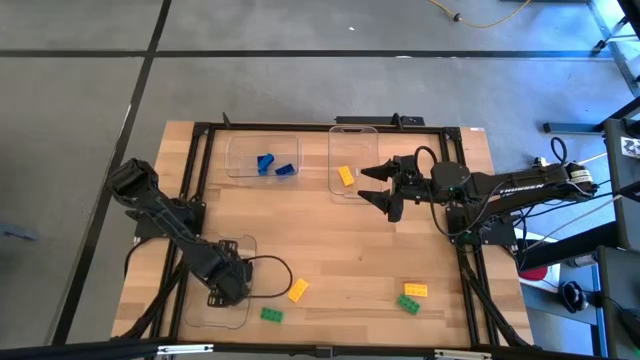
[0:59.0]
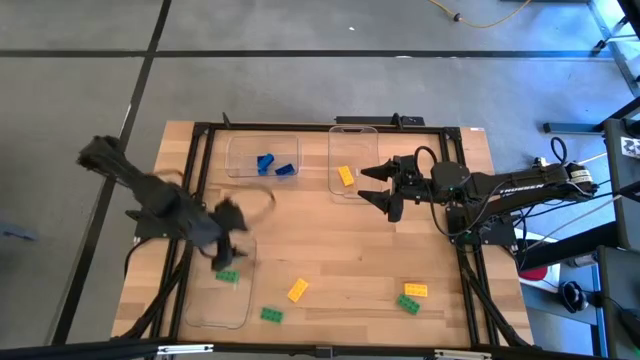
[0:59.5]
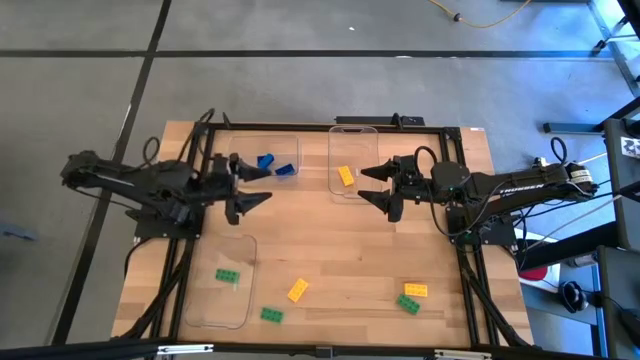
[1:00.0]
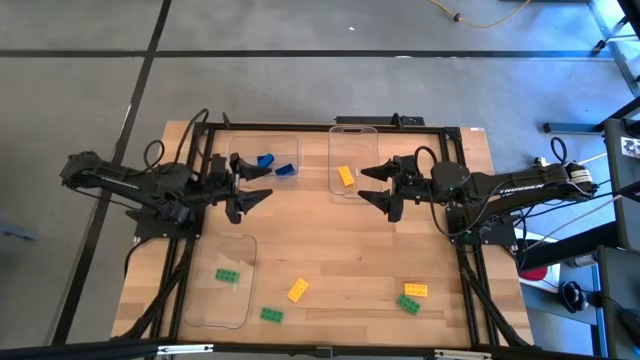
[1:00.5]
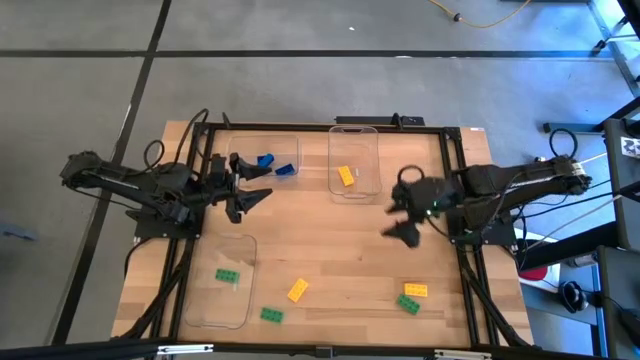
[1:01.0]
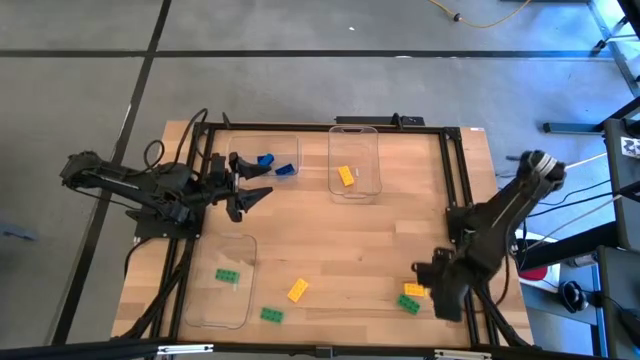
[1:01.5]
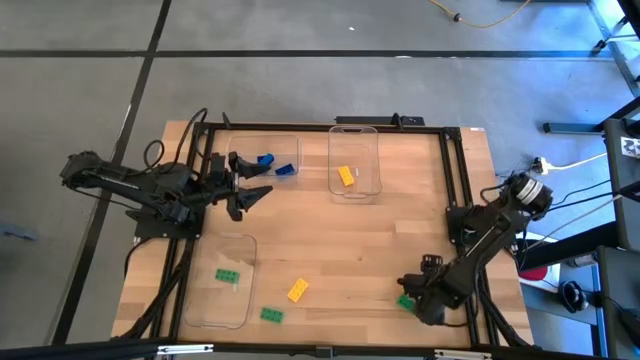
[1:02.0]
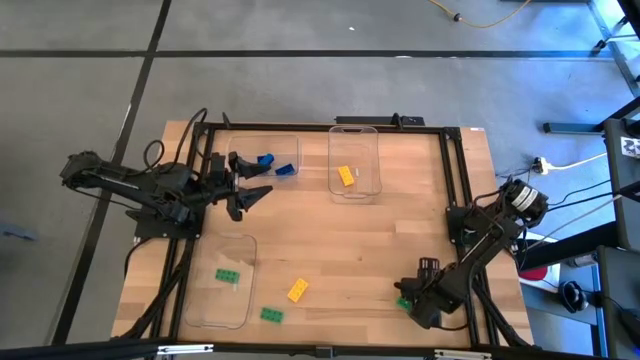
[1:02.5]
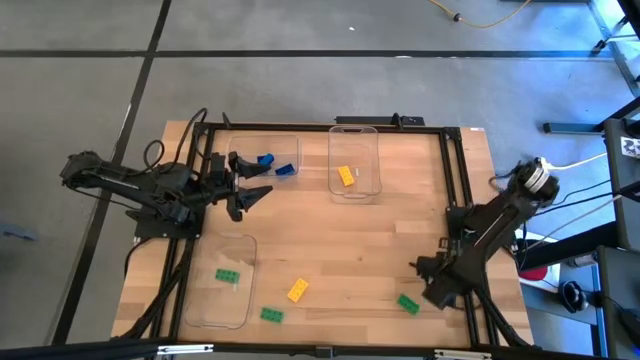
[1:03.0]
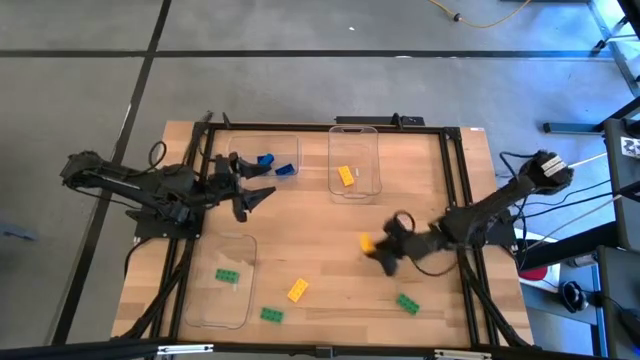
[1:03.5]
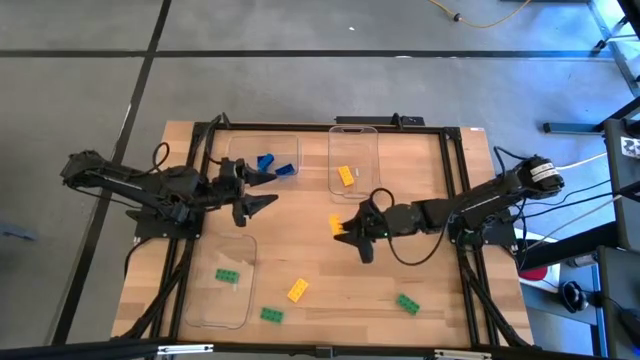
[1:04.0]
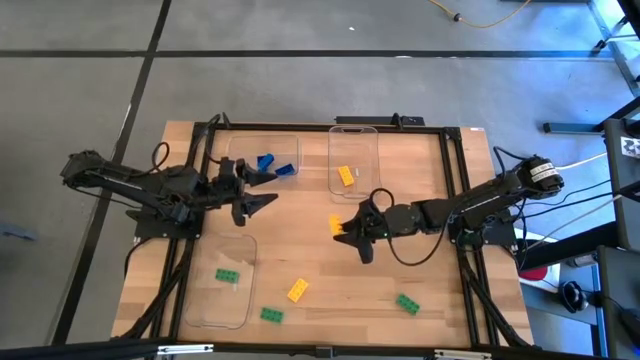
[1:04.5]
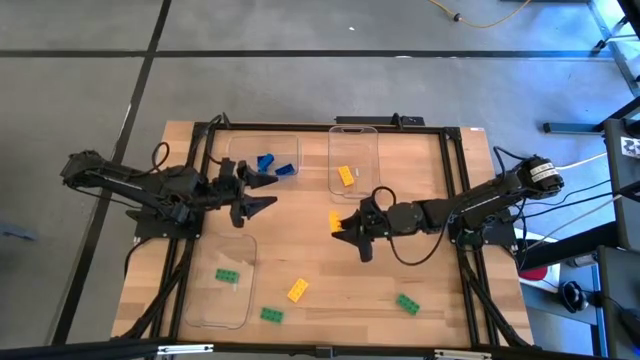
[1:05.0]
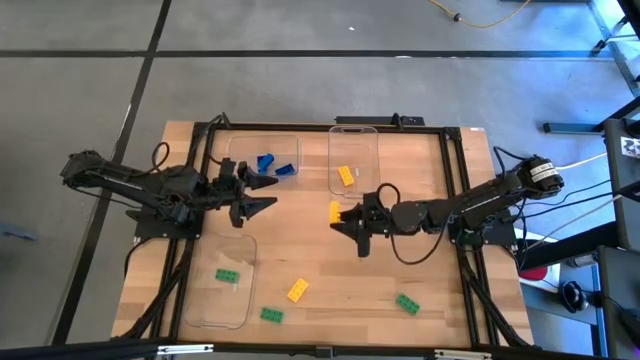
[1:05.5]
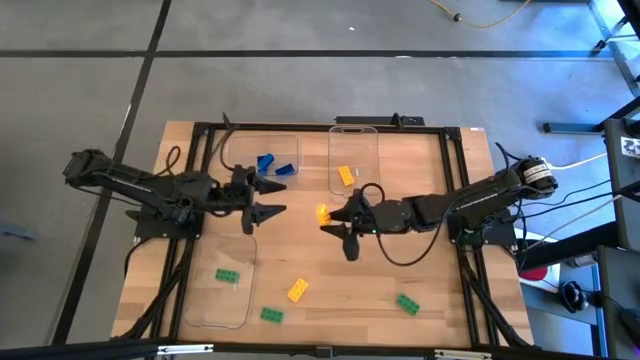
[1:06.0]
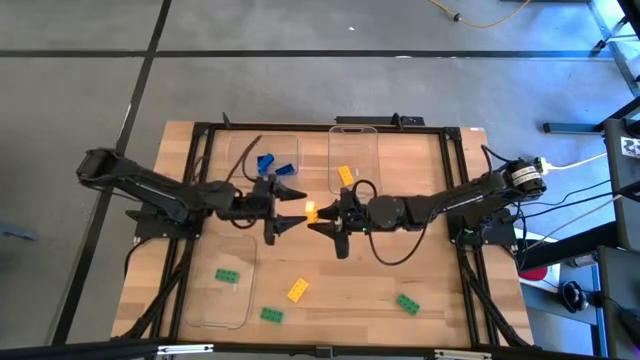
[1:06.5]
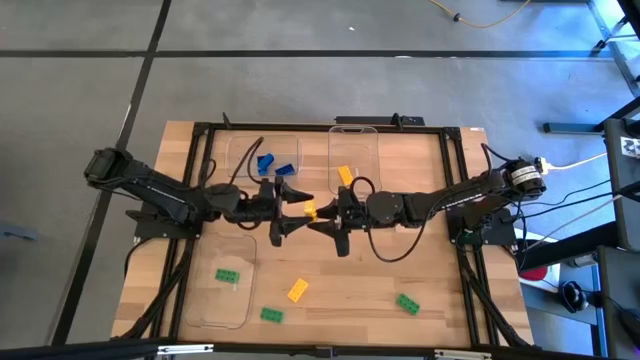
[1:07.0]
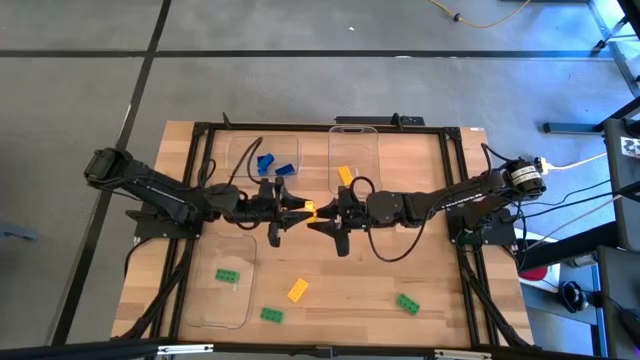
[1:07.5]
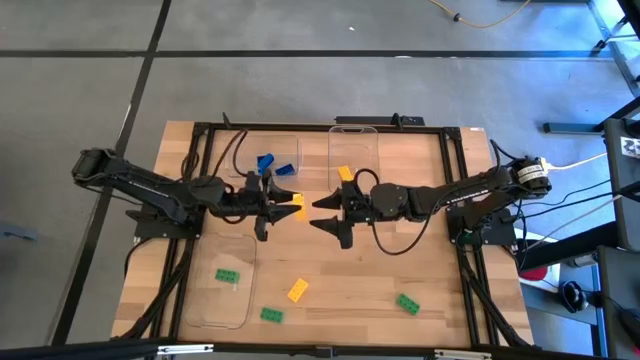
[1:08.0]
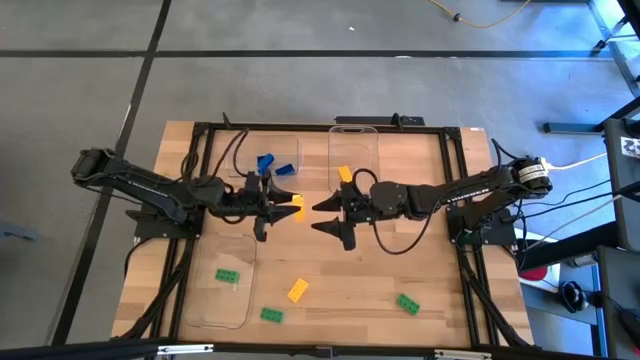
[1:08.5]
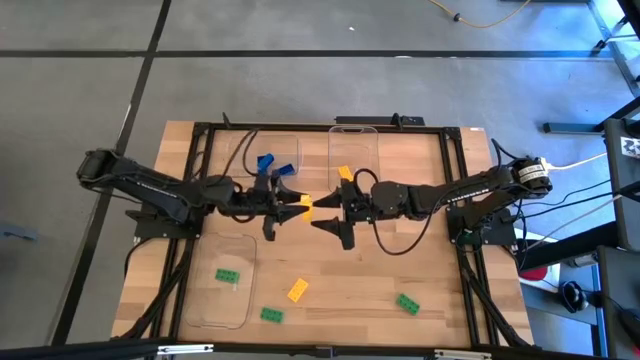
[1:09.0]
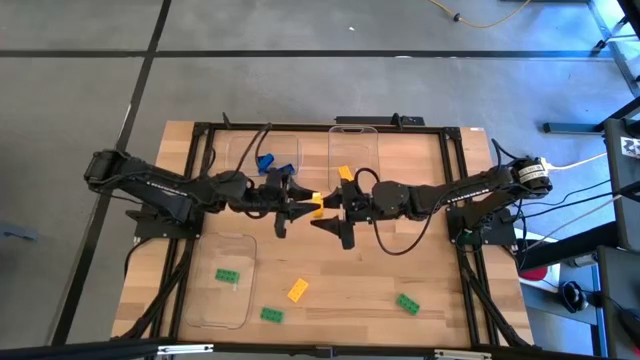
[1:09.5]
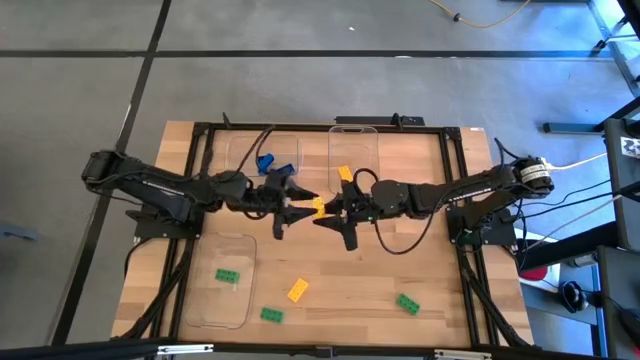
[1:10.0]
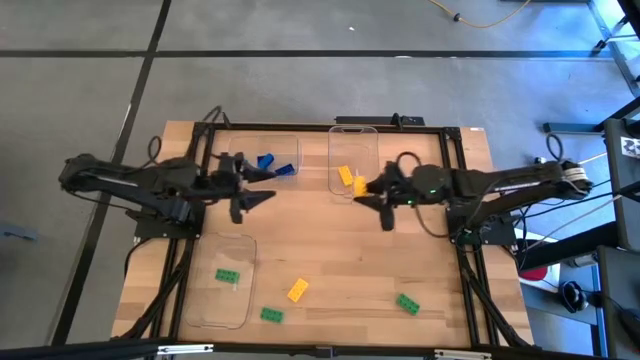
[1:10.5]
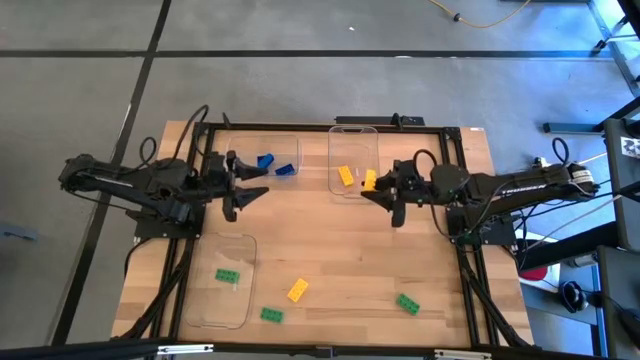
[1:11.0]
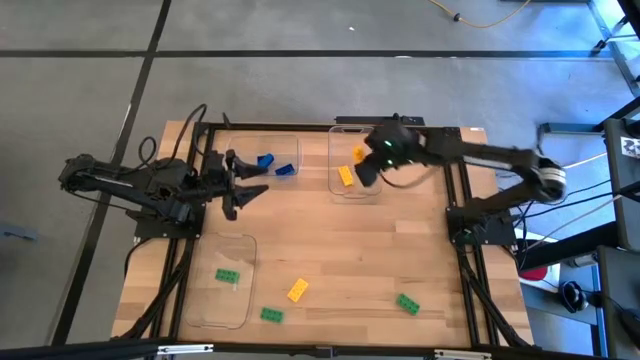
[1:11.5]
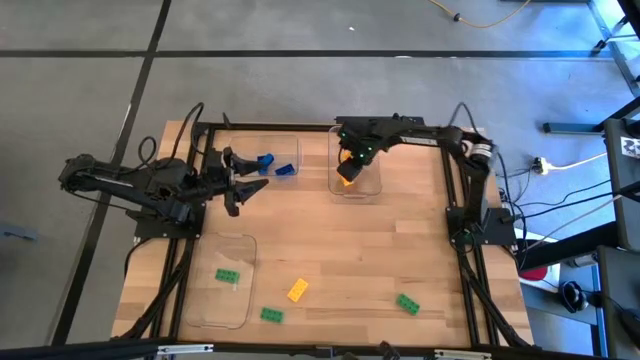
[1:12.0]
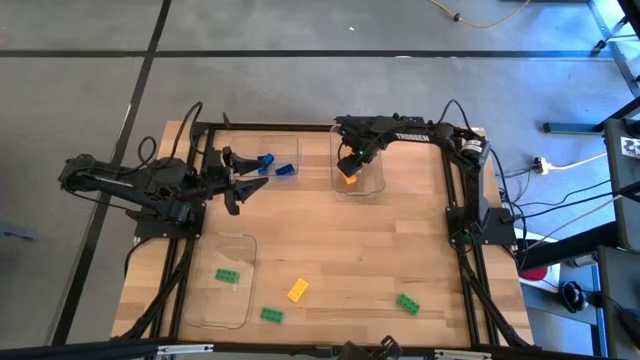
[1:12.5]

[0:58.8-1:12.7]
Task: Sort & place blocks by color
Put the right yellow game piece into the top right transparent bin

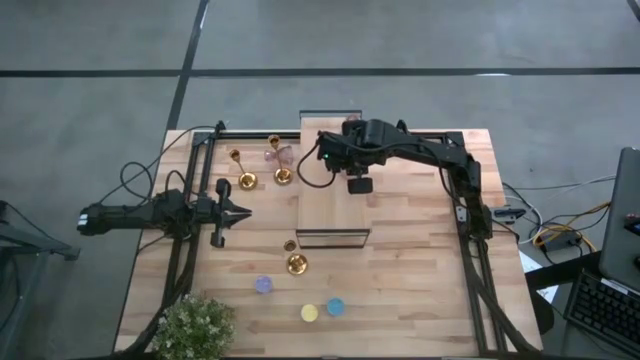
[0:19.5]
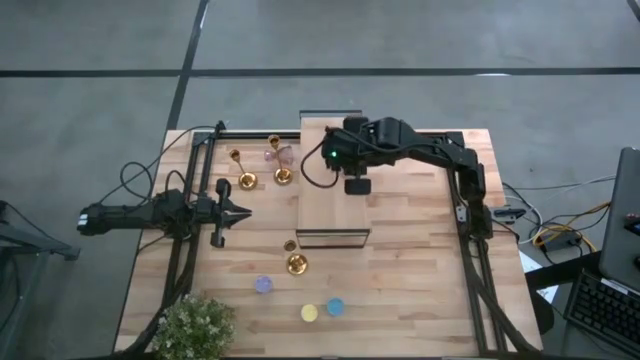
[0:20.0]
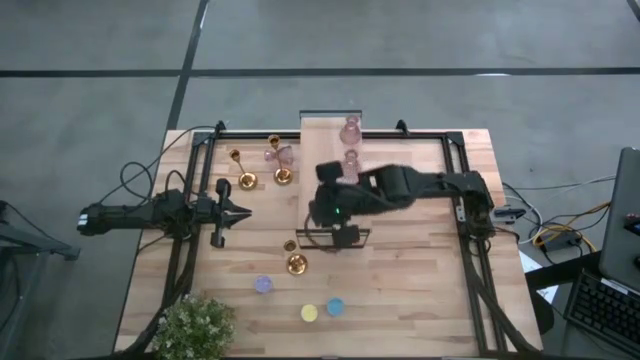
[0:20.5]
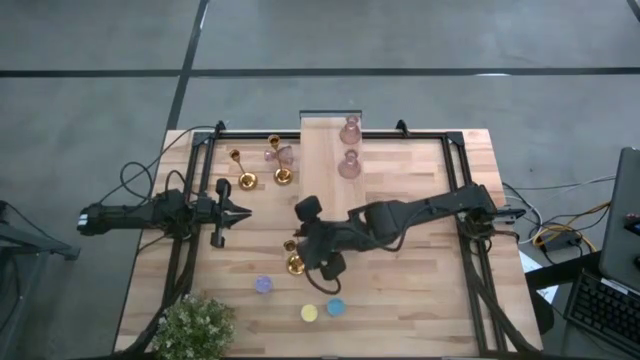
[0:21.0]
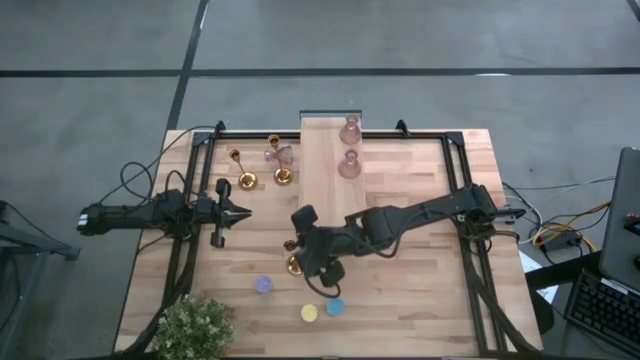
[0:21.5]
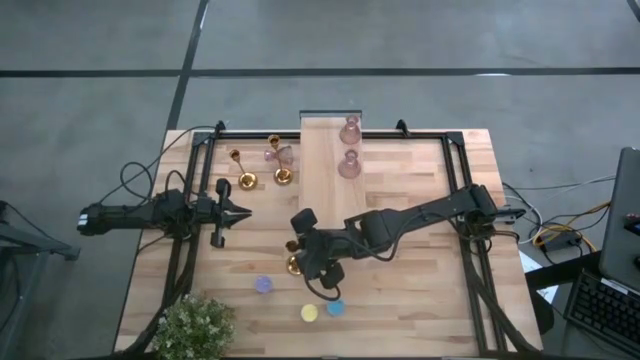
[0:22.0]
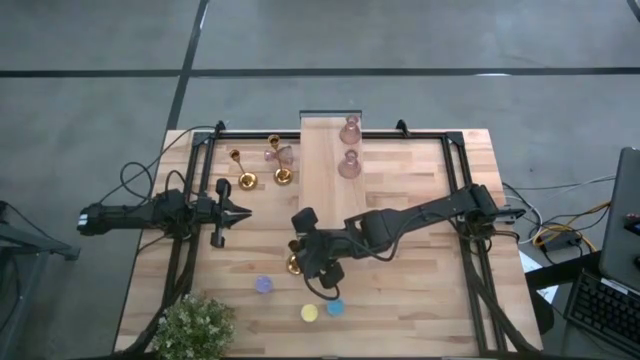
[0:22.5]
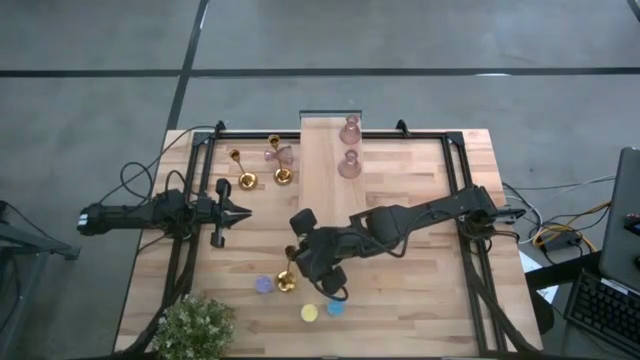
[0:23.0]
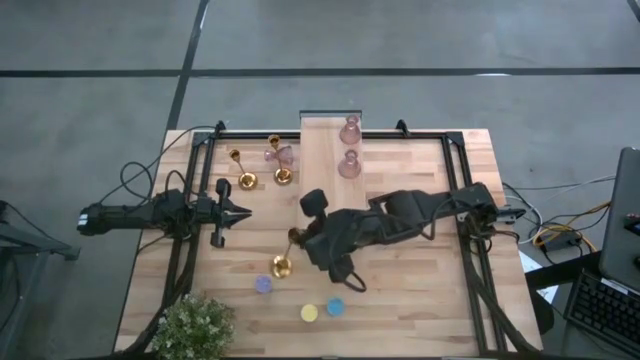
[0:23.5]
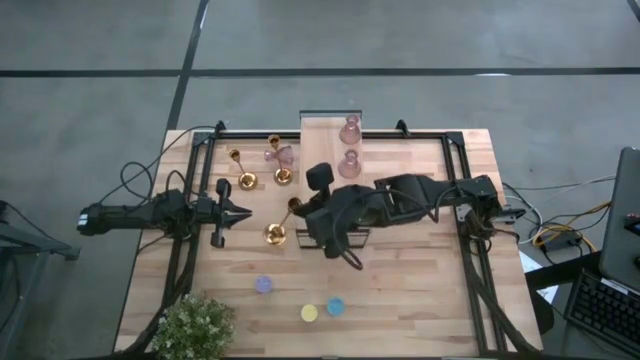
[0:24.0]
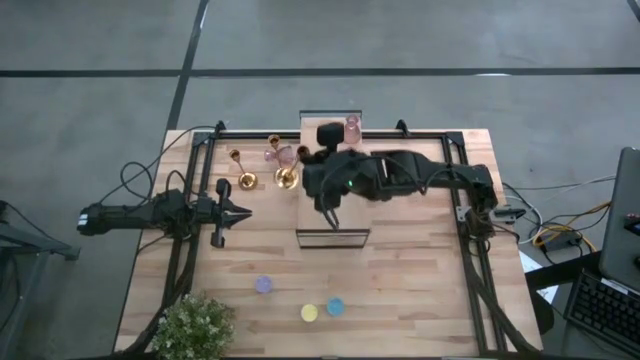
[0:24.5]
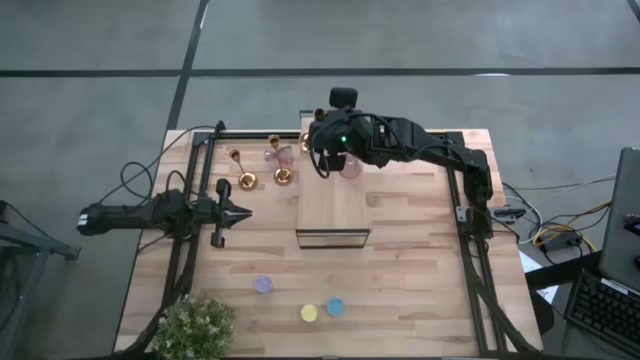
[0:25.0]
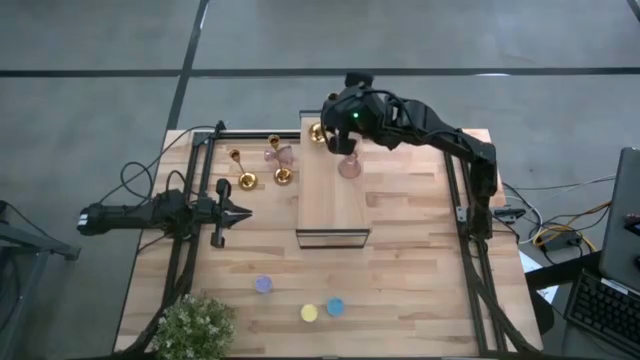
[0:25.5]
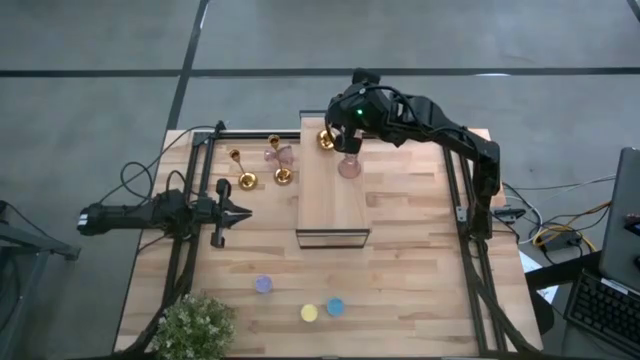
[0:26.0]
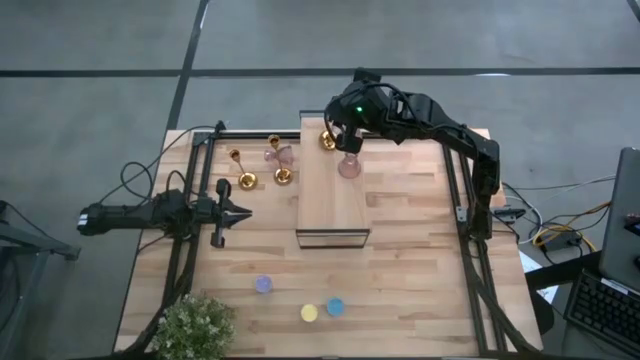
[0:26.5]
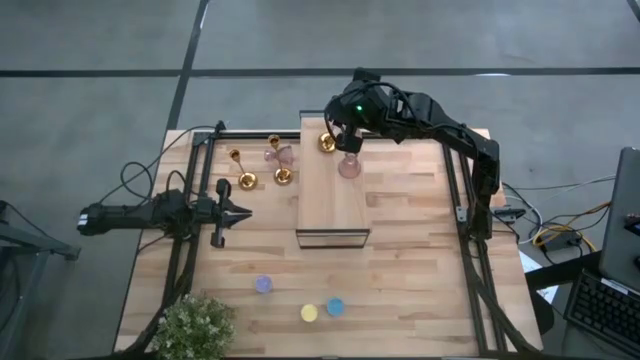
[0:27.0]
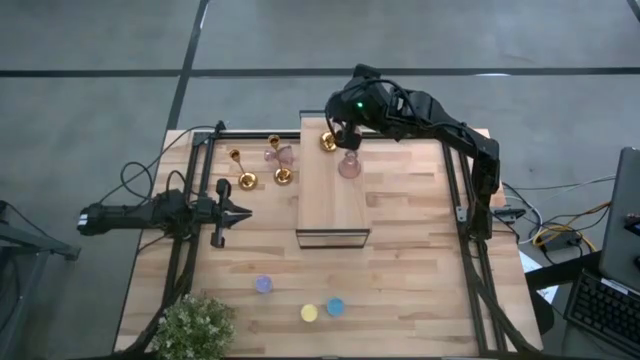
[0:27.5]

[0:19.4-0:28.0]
Task: Pick & Place candle stick holders
Put the bottom gold candlestick on the shelf
